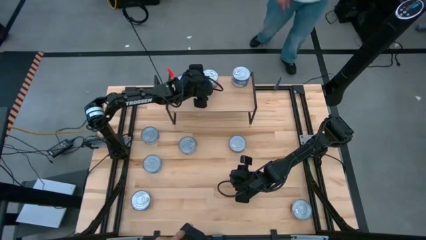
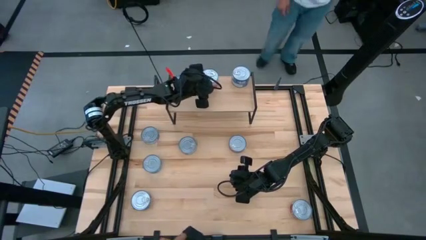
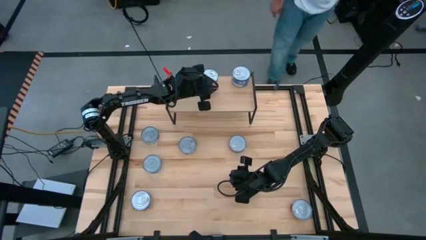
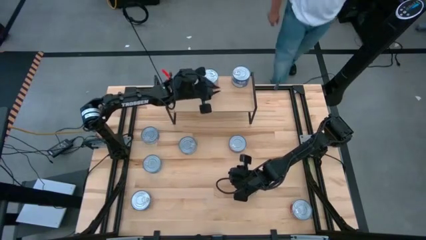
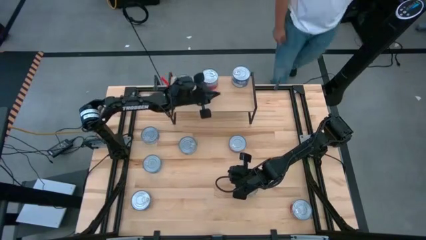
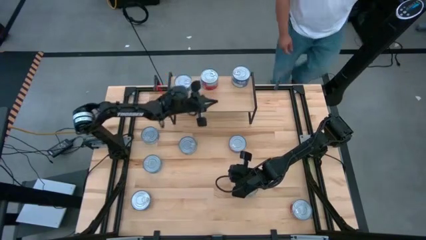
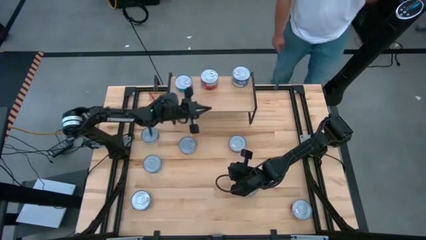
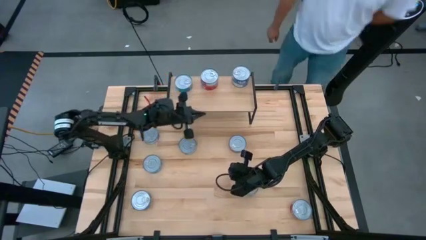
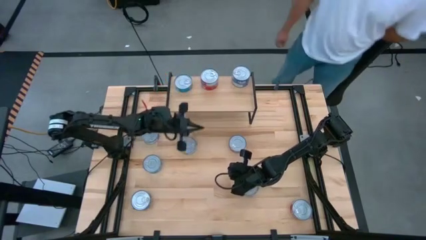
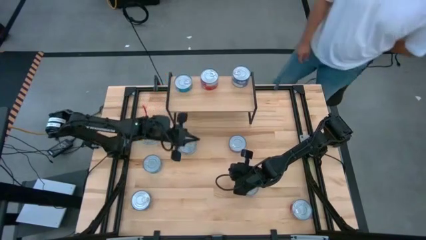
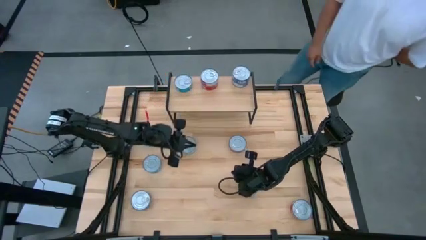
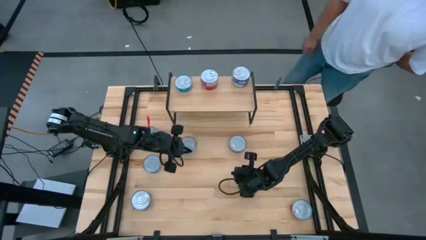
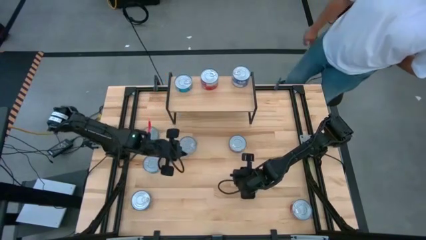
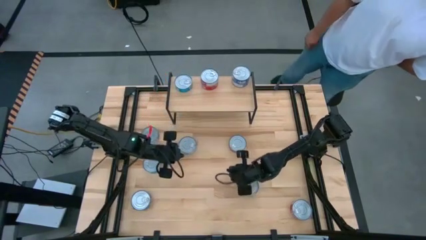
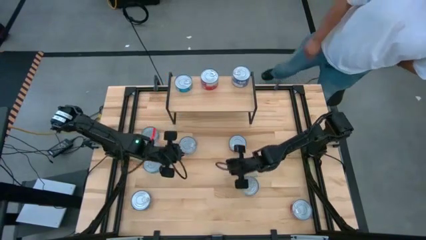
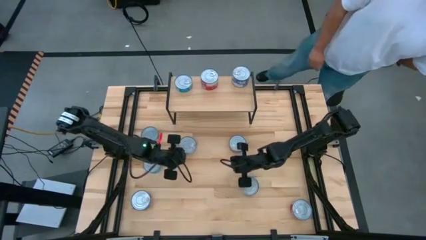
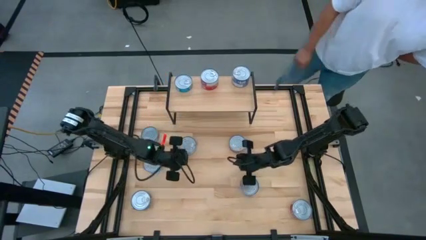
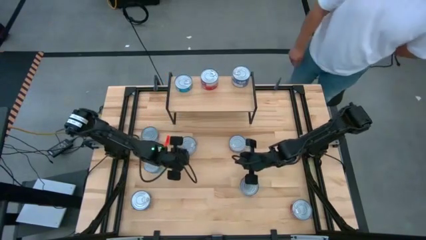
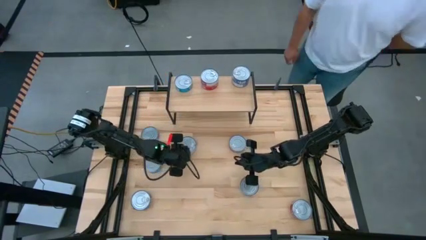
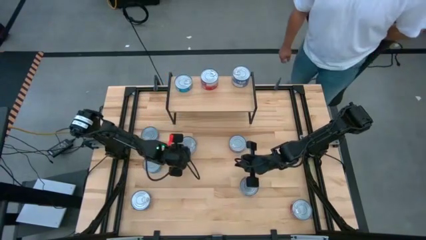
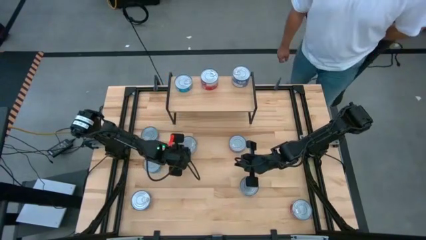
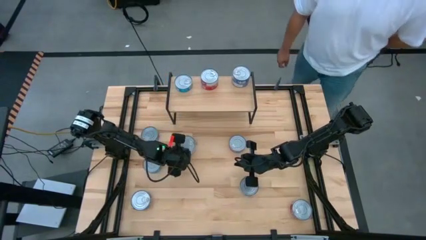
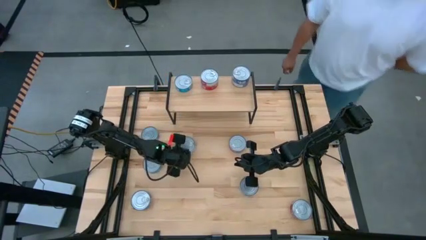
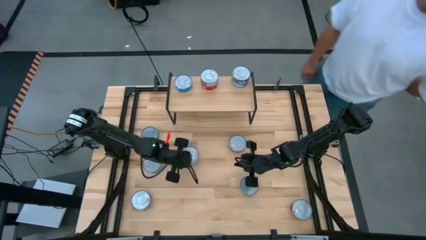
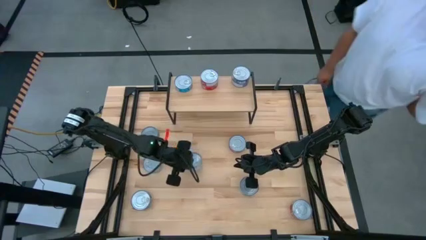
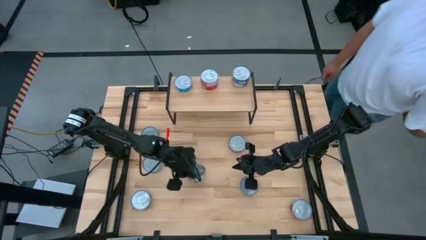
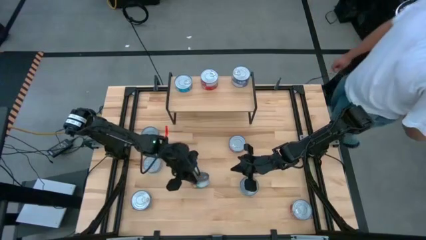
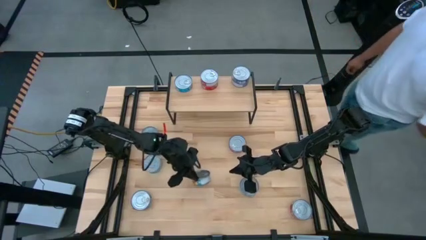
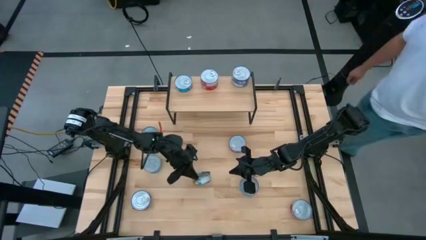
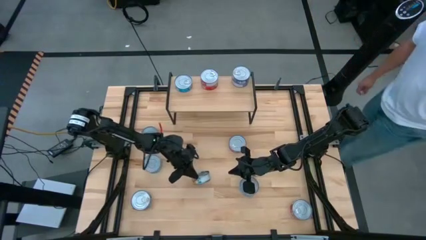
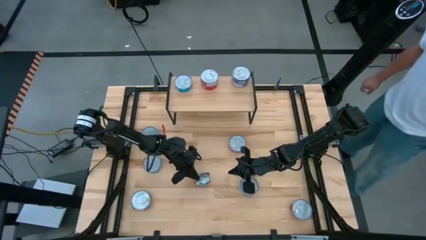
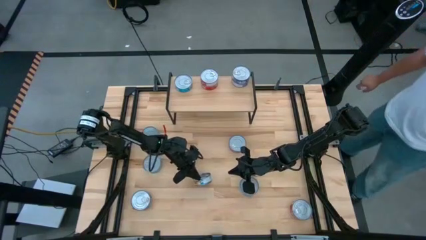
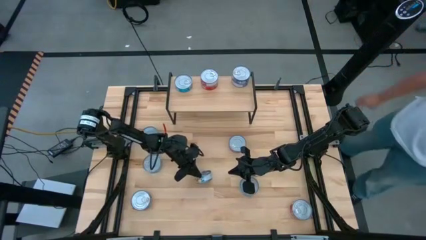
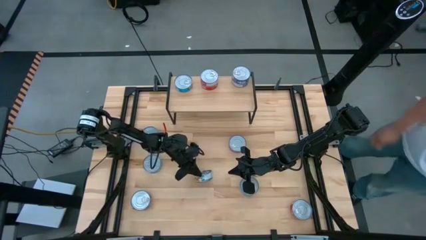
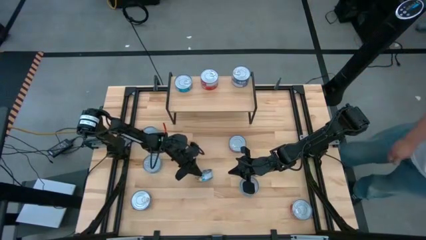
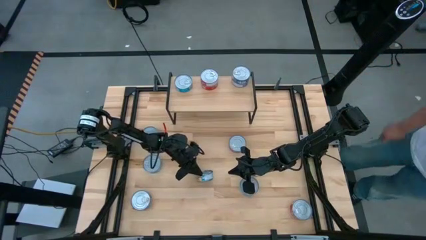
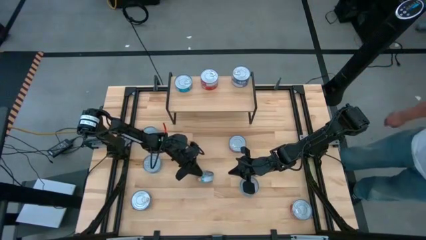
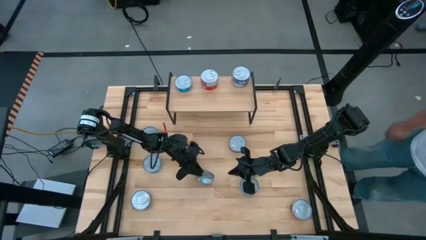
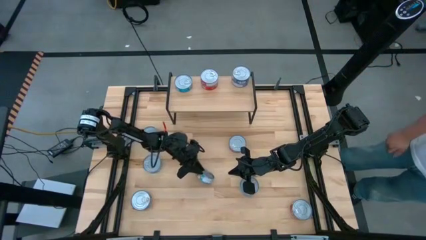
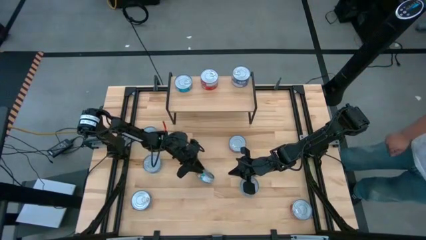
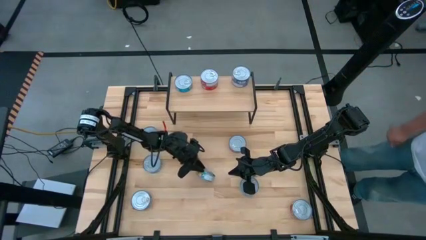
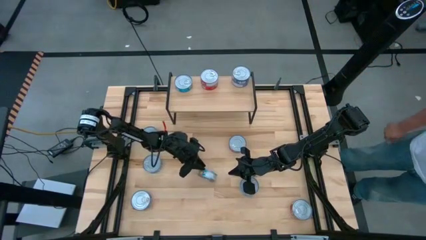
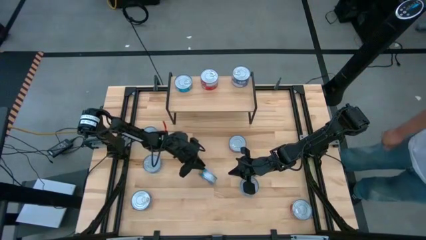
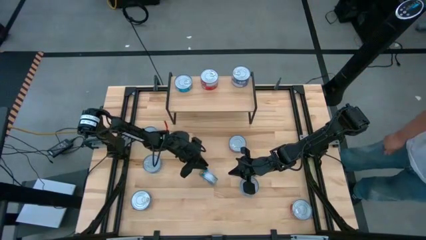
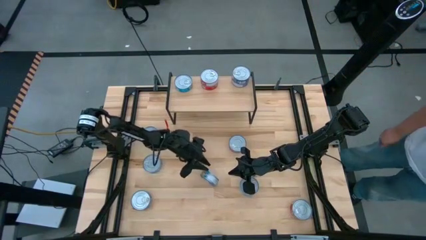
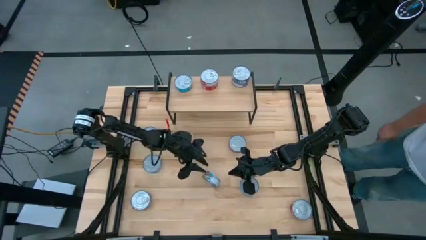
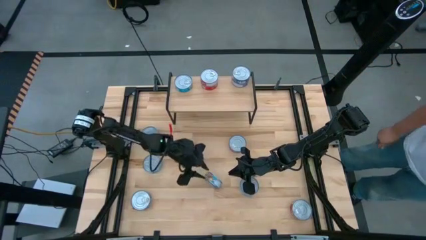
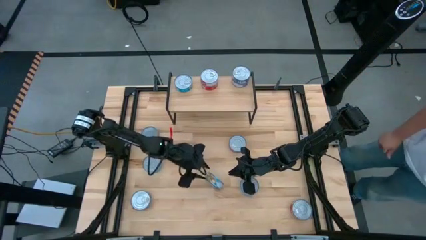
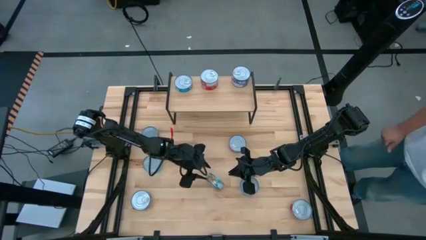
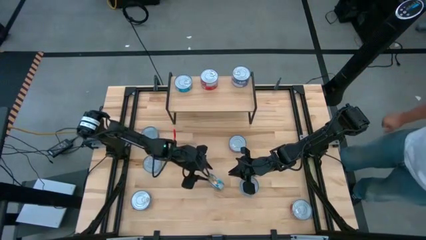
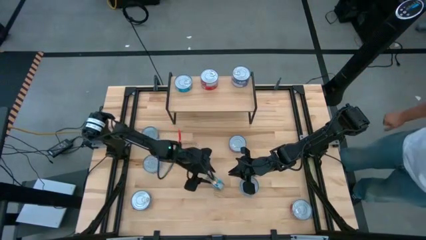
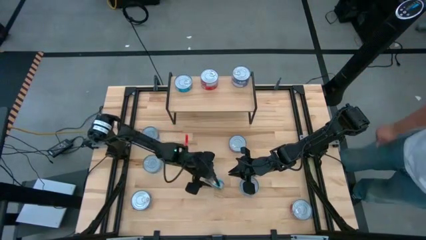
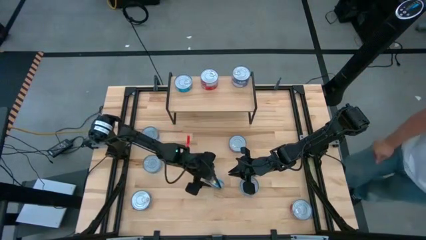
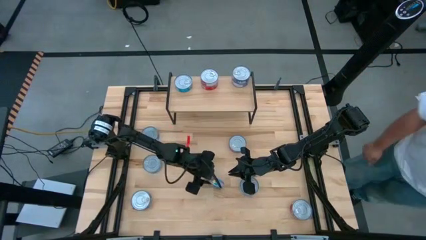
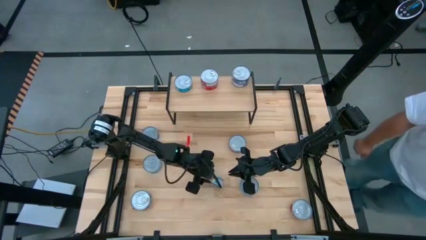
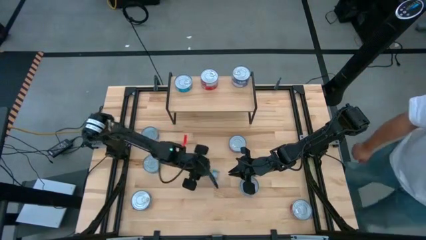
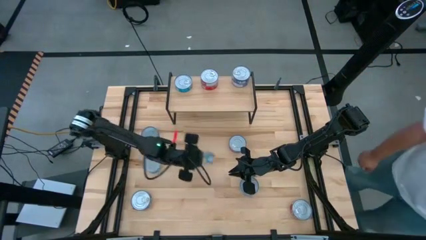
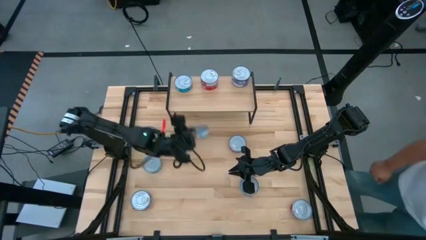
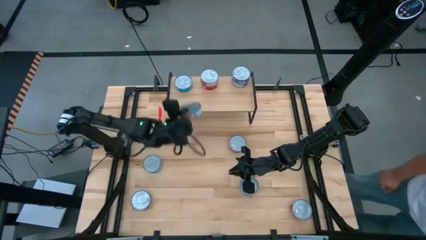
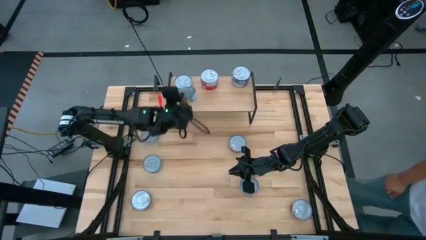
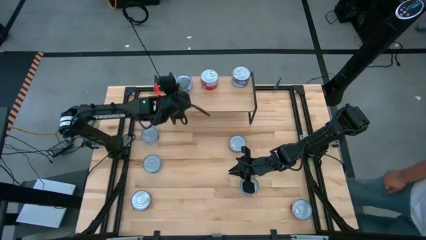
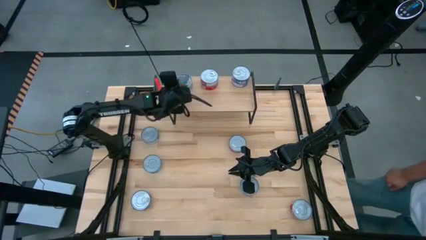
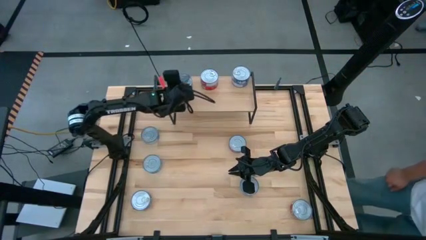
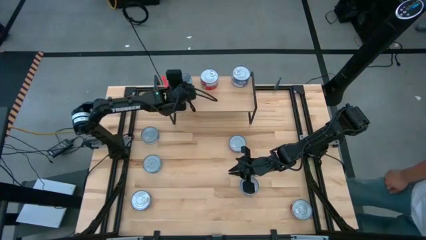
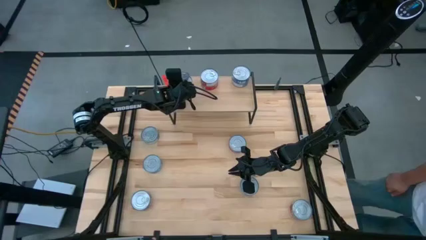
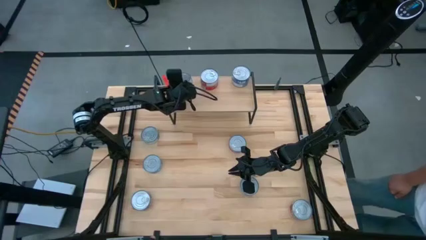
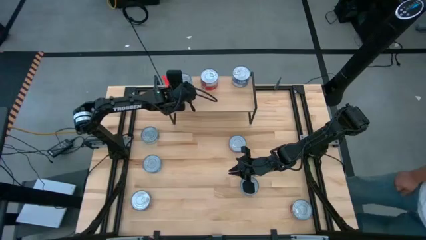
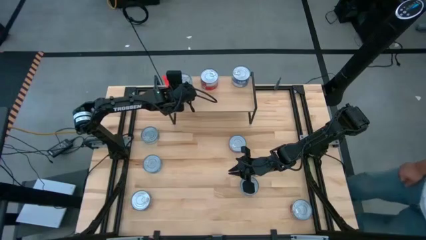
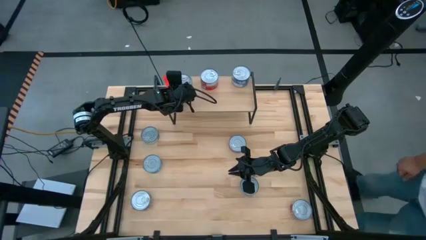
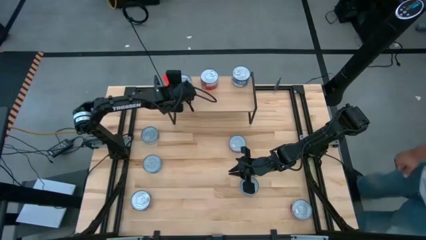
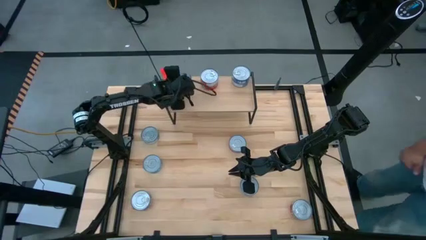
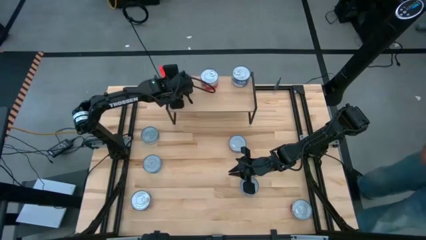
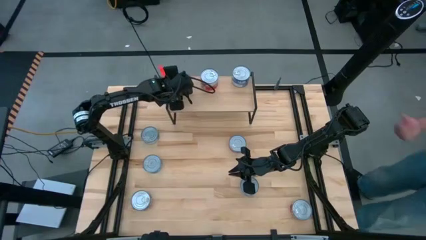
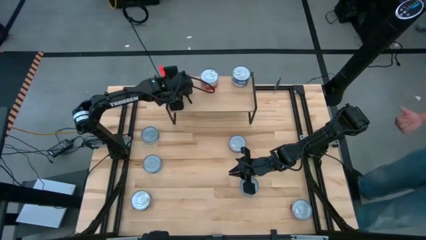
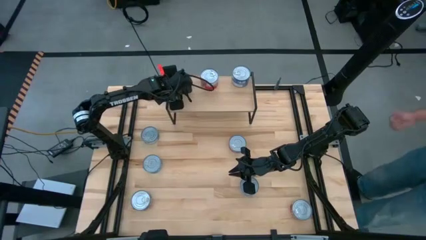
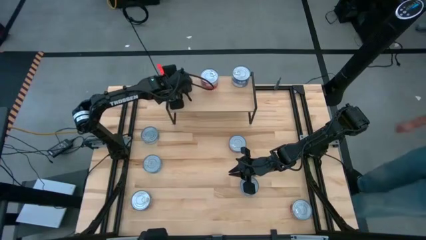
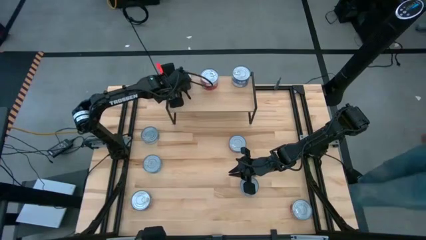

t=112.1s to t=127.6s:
Task: Stack canned seafood by type on shelf
Stack the yellow blue tuna can on top of the other yellow blue tuna can on the shelf

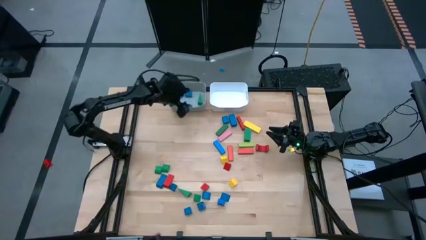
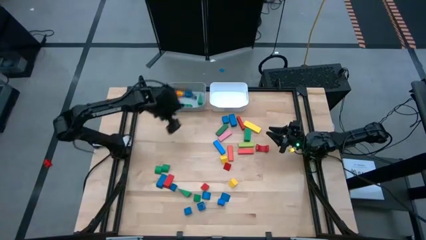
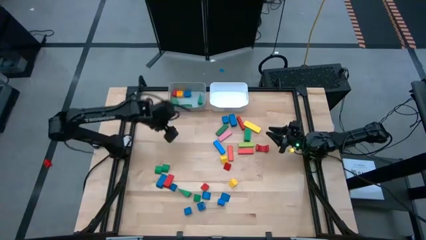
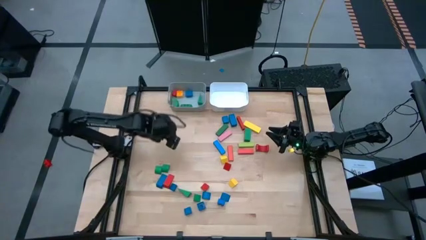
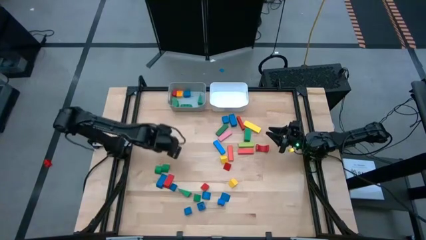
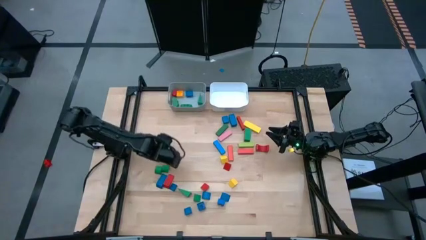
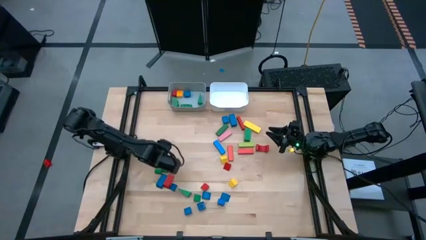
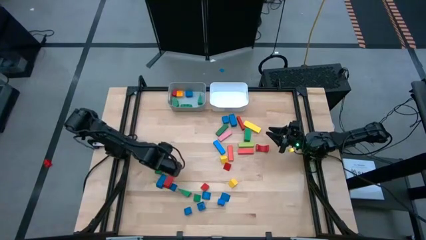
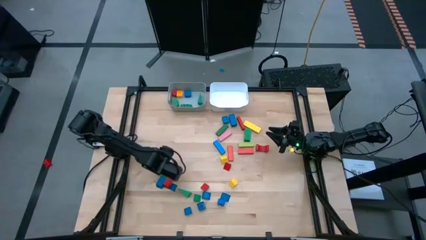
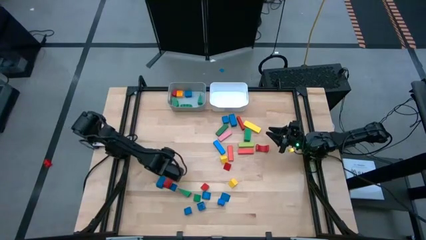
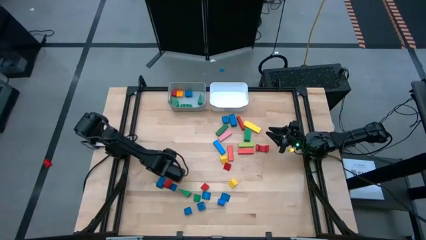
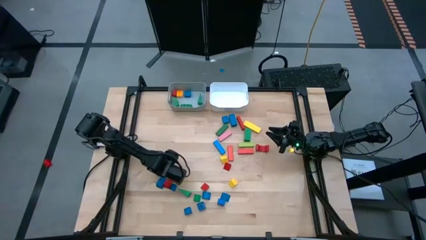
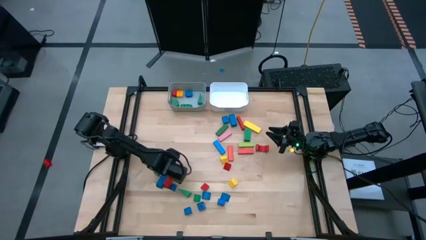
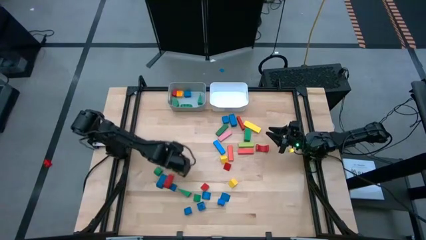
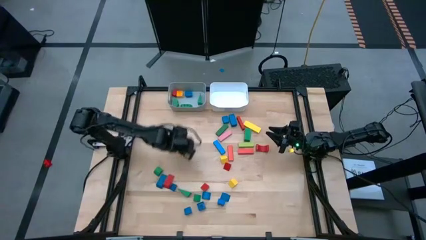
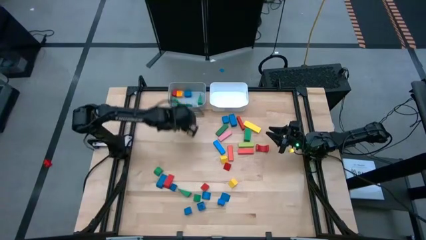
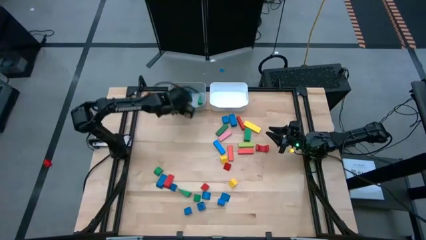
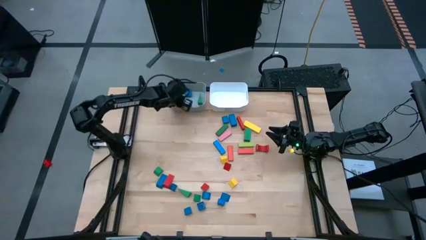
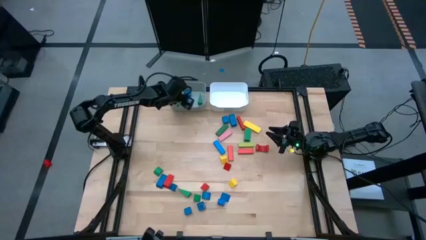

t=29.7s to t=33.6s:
Task: Sort blocks by size
Put the green semi-circle block into the gray bin
